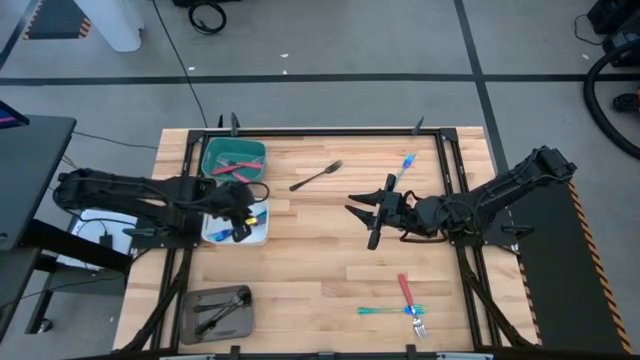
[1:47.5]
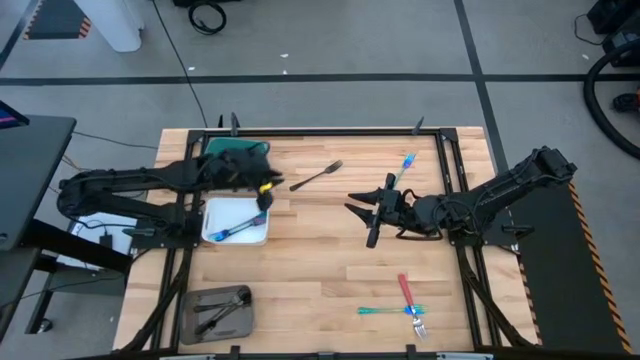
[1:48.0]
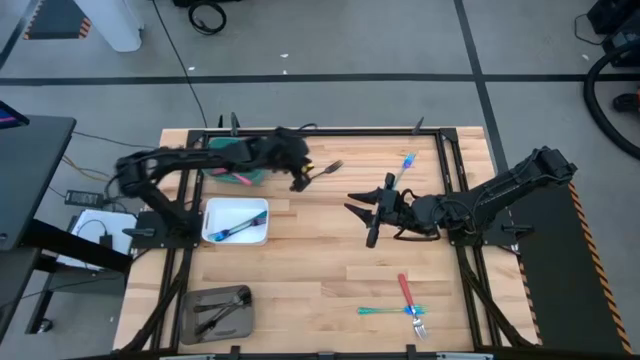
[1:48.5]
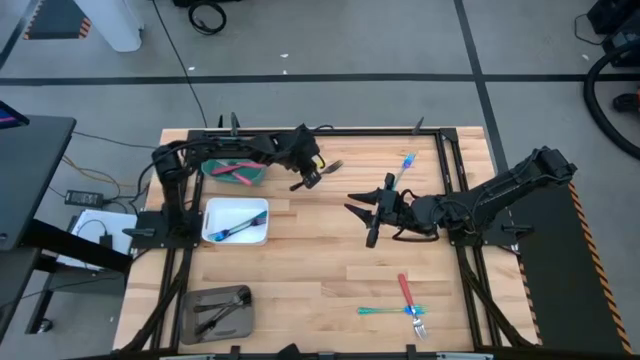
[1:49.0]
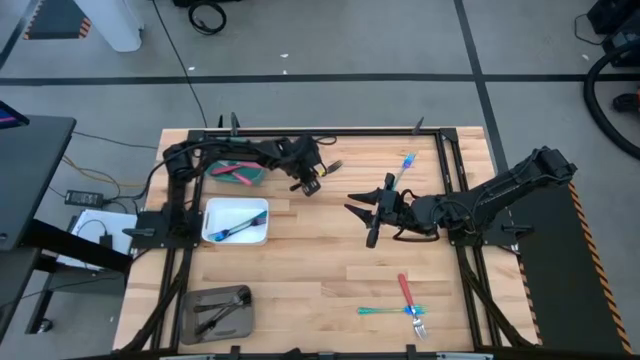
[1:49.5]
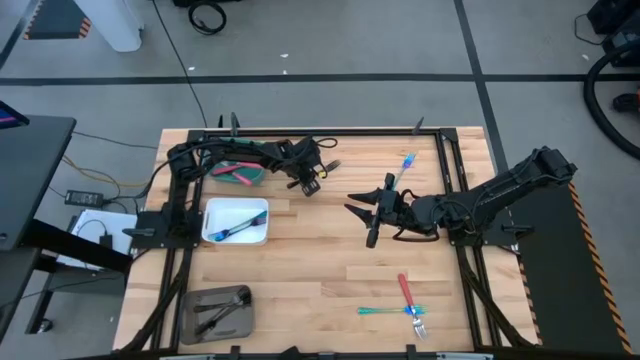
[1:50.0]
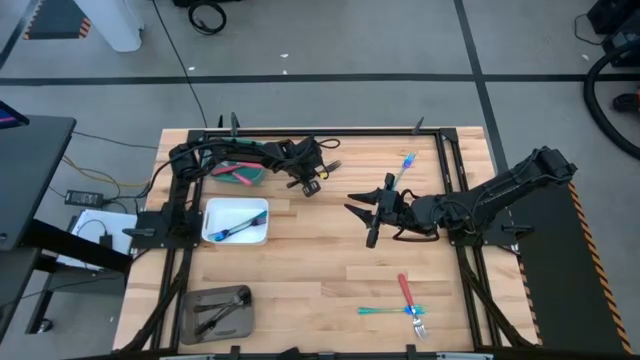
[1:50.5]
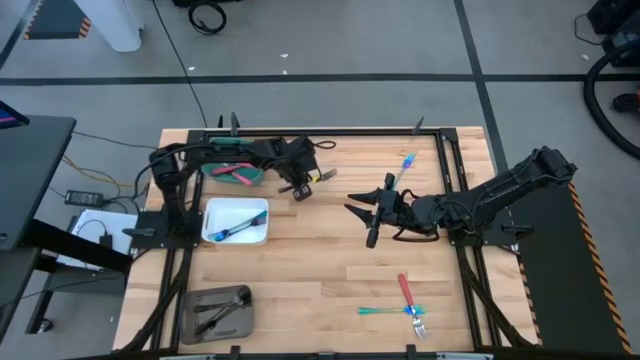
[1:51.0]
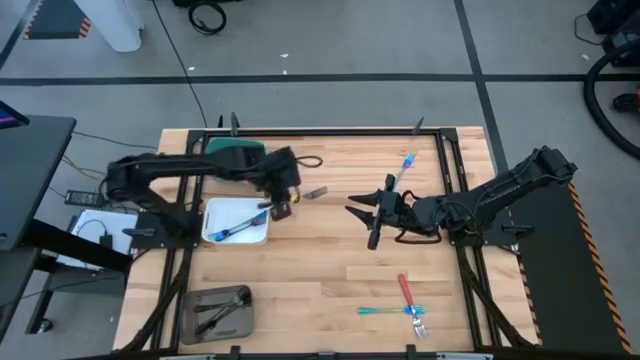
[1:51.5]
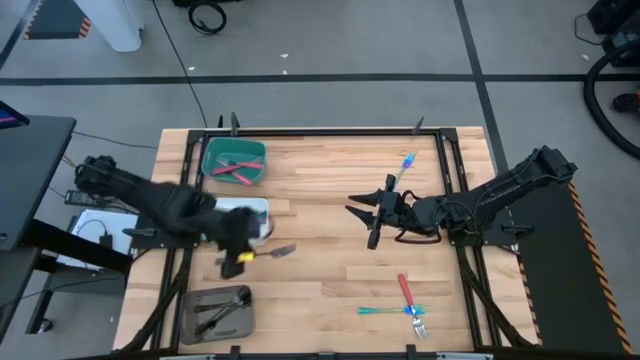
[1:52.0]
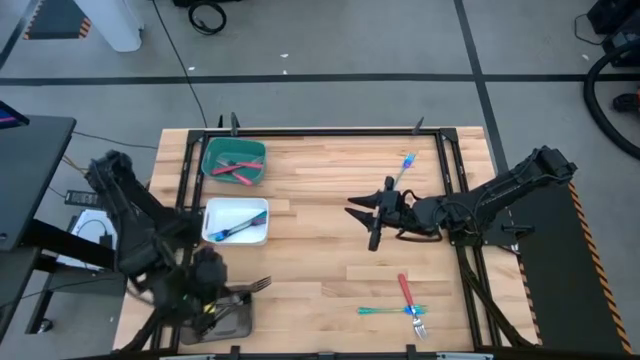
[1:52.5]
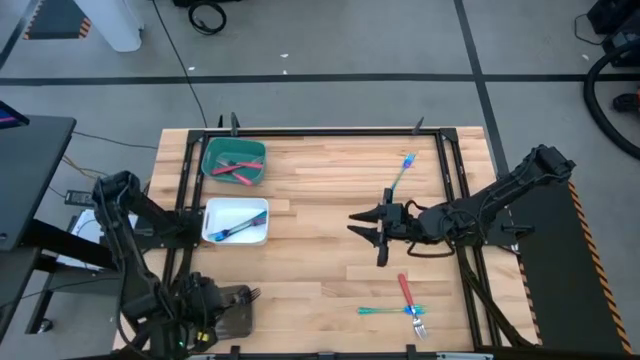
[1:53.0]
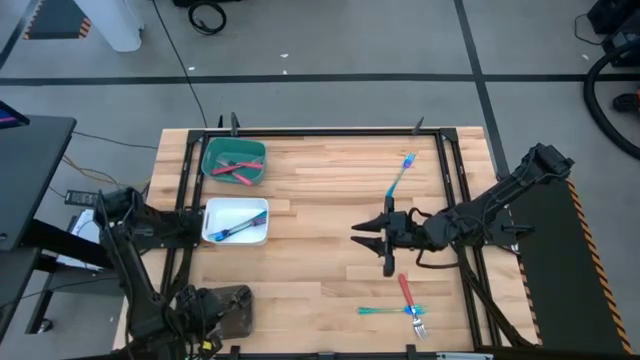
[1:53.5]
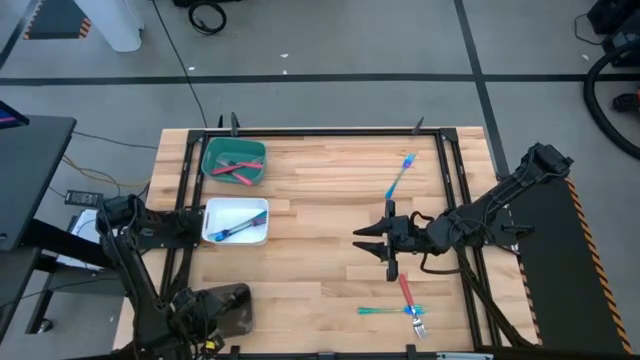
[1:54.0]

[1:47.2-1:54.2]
Task: Sort silverware by color (type)
Put the black fork into the black bin

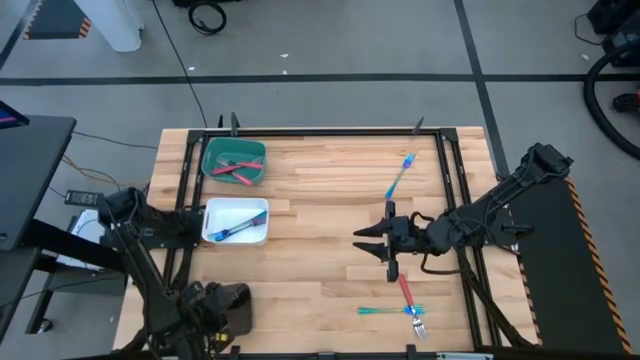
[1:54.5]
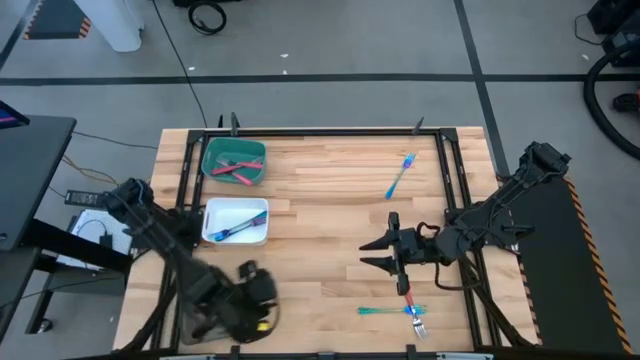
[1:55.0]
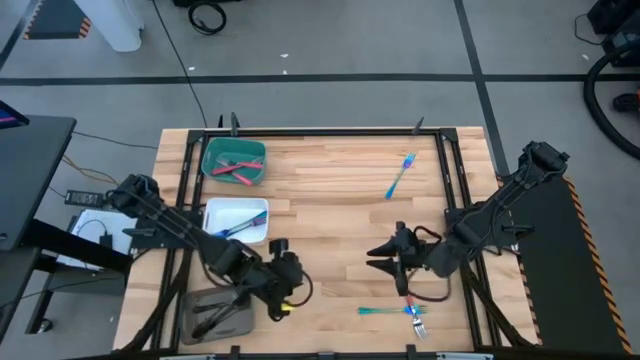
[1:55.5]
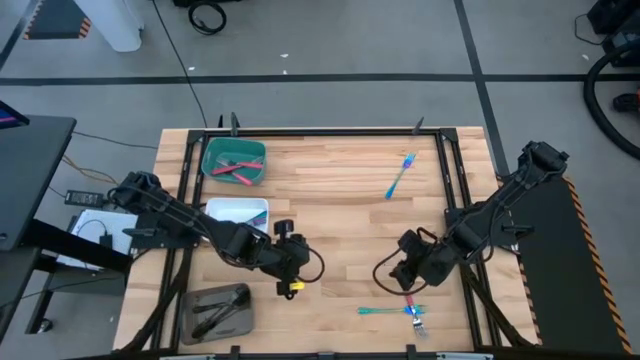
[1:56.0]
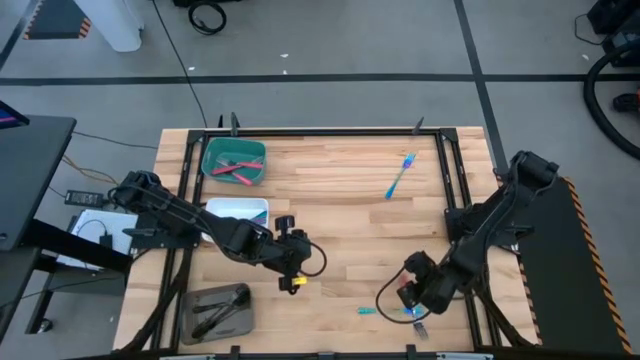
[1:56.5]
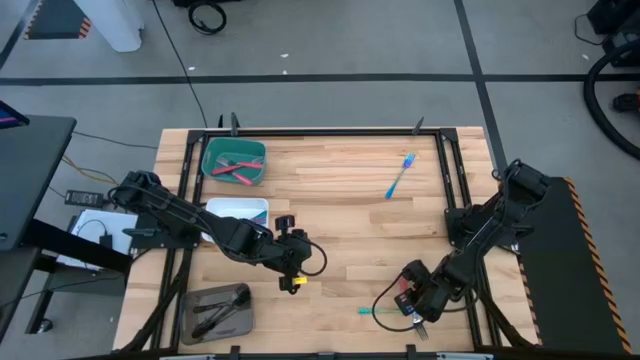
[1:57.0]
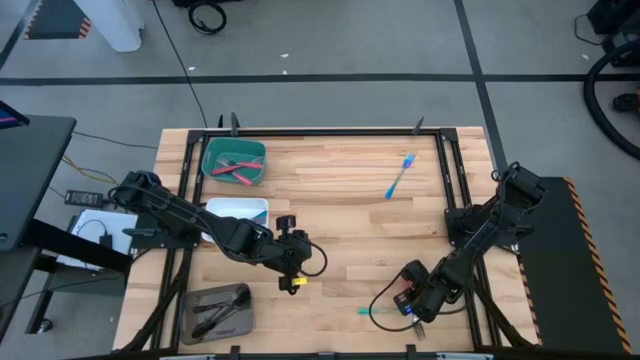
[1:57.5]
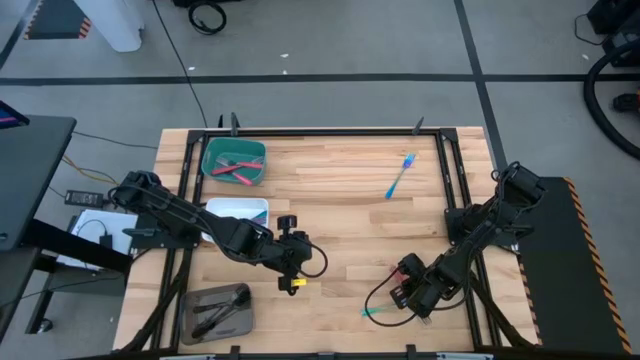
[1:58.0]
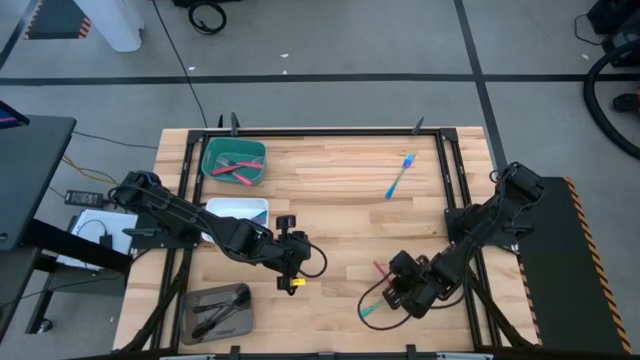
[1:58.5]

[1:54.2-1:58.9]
Put the pink fork into the green bin

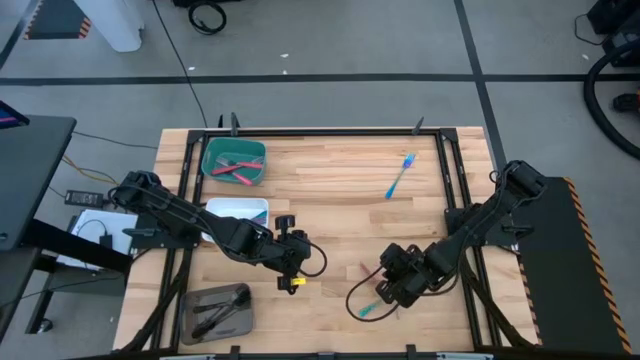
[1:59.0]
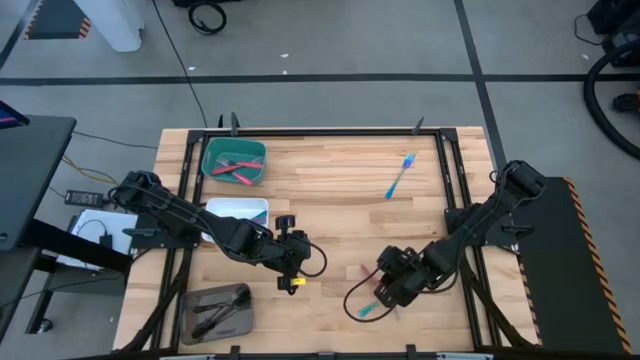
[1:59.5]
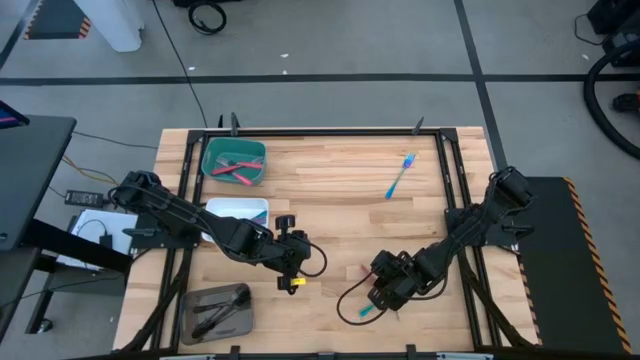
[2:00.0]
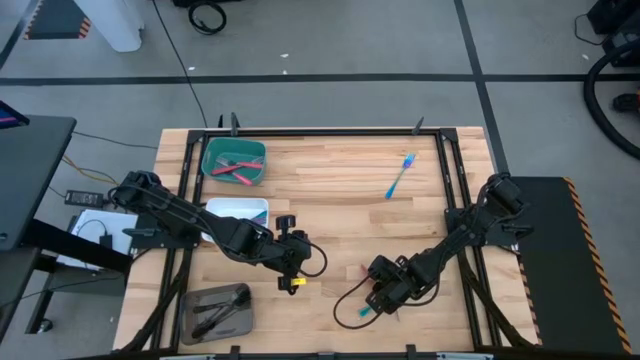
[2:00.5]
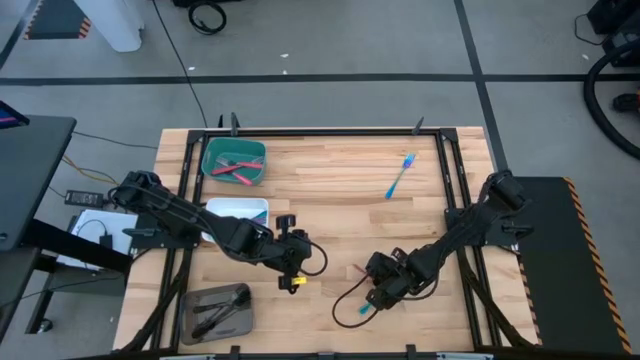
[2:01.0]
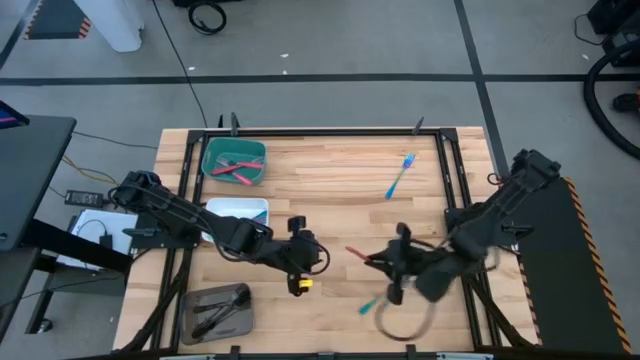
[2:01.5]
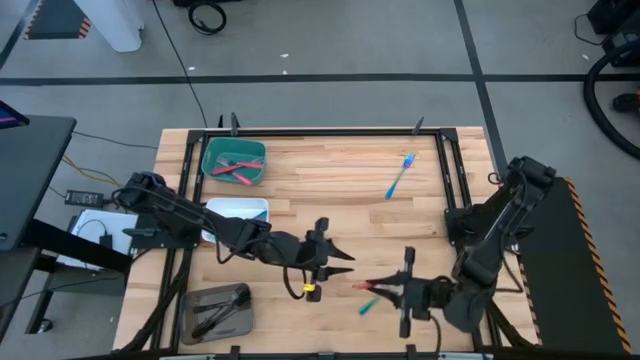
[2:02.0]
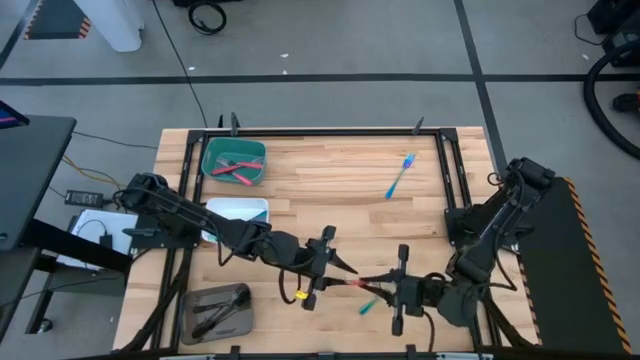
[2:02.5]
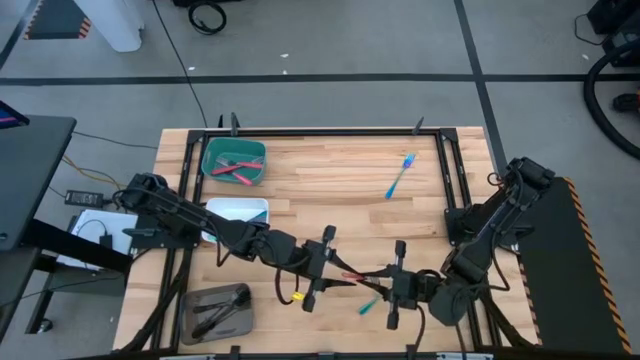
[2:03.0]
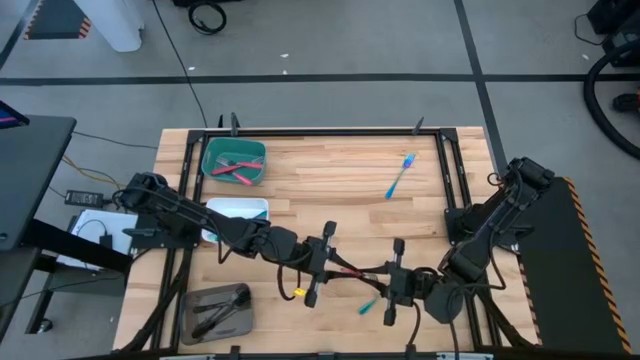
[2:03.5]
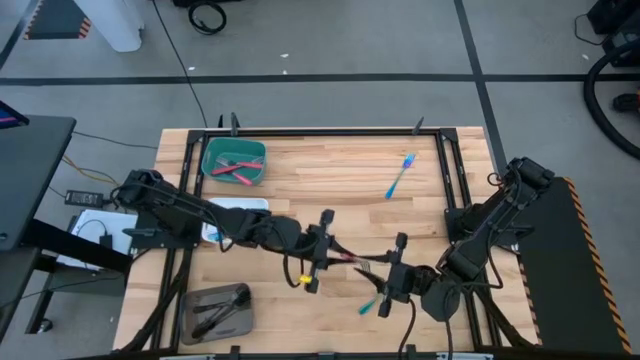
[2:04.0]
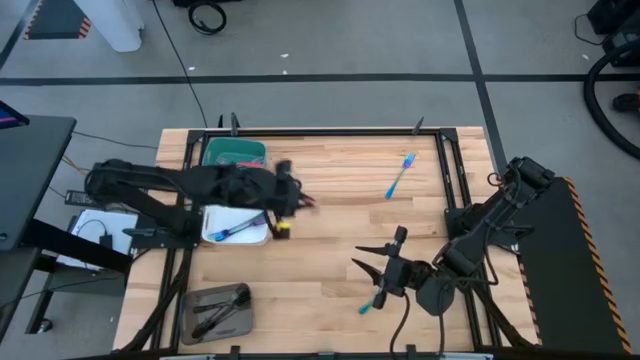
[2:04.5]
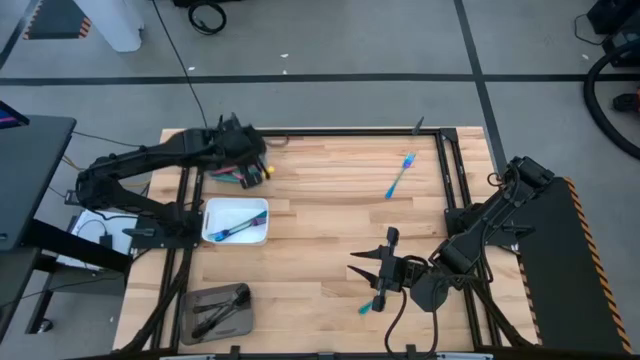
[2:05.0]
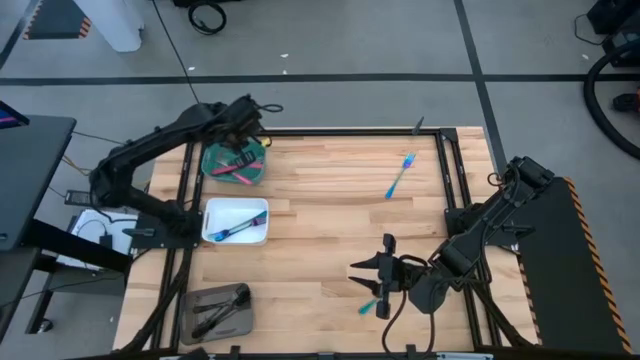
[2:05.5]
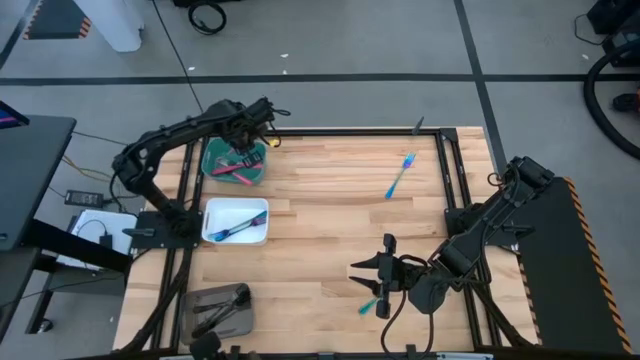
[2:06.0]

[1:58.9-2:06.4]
Put the pink fork into the green bin

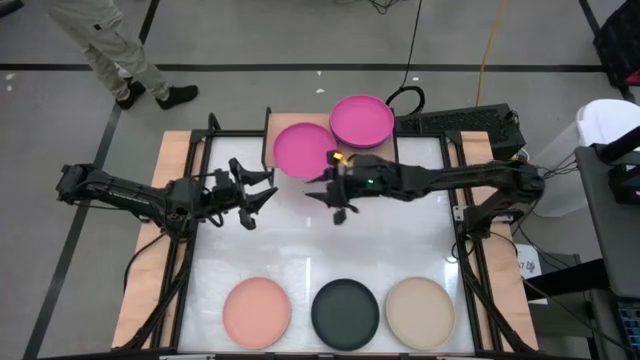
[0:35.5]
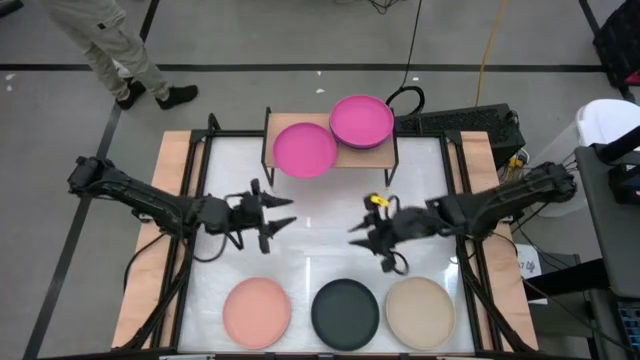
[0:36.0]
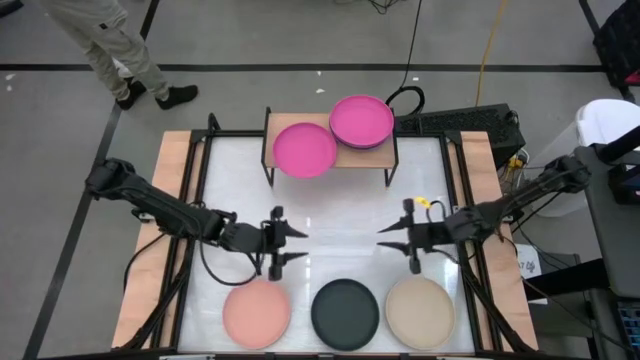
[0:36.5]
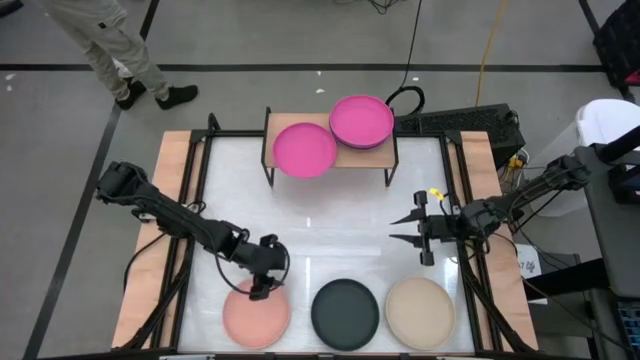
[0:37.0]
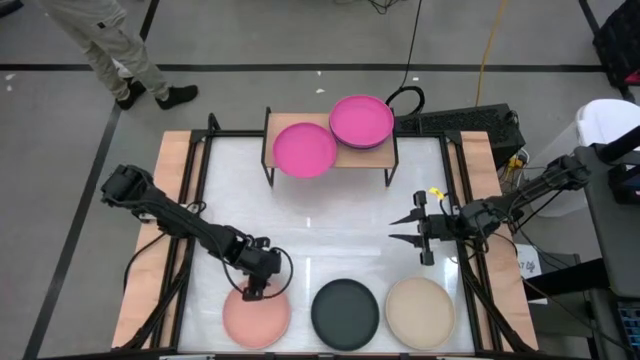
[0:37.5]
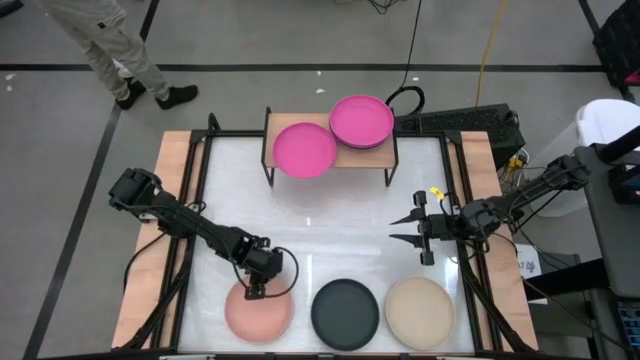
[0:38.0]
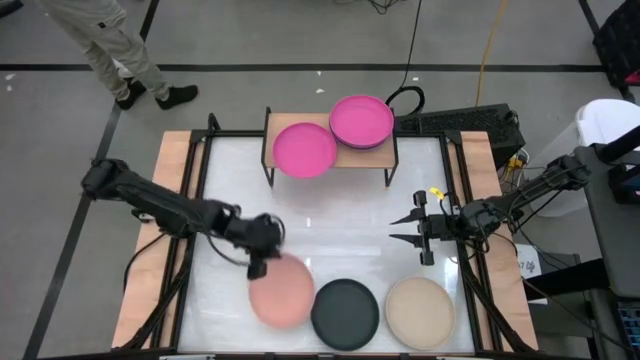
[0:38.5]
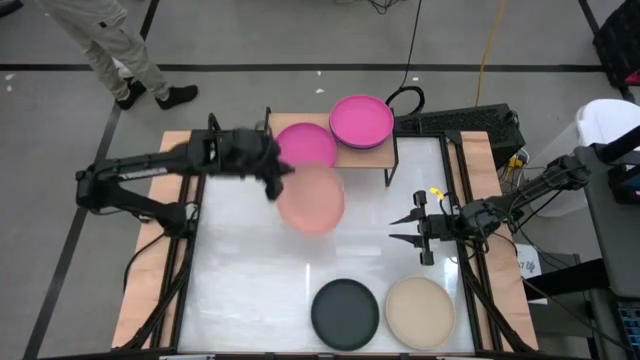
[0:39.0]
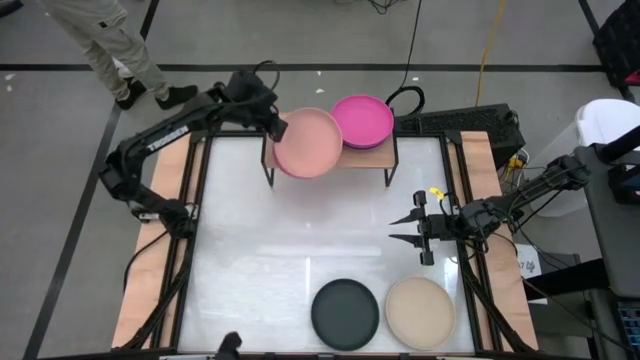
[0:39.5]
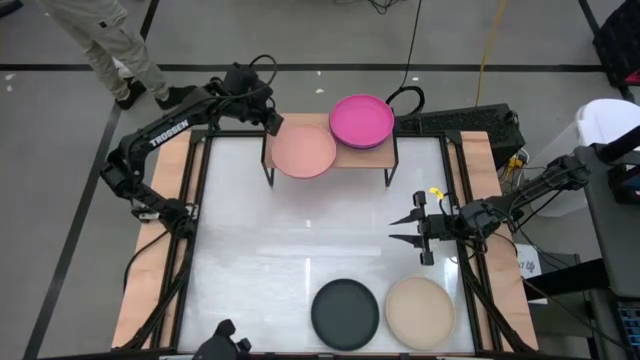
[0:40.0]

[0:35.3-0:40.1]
Task: Place and stack plates onto a shelf
Stack the light pink plate on top of the pink plate on the shelf
